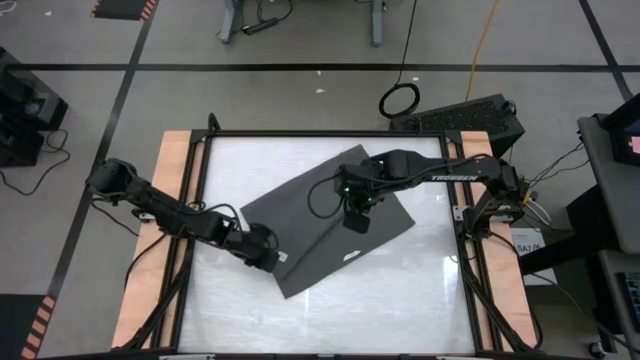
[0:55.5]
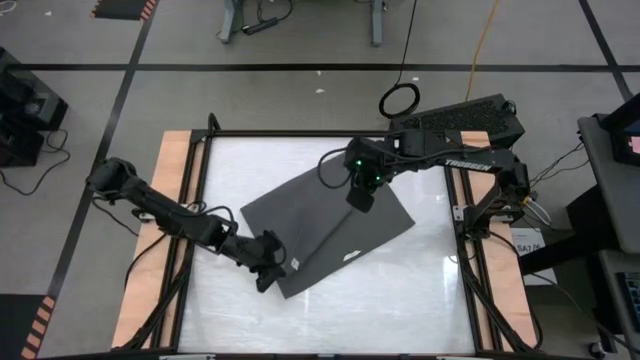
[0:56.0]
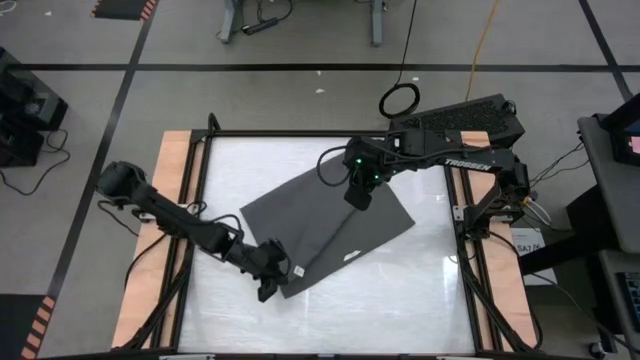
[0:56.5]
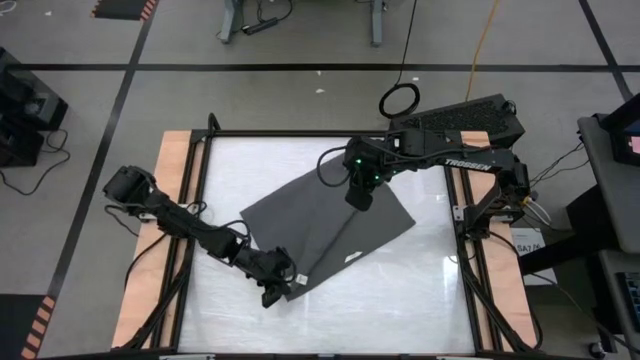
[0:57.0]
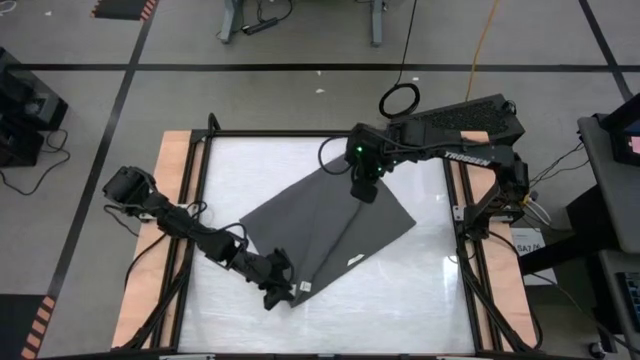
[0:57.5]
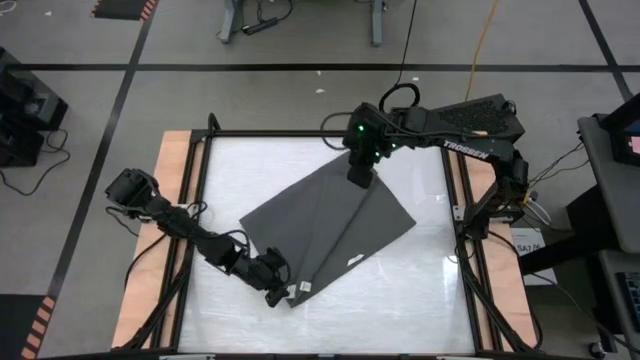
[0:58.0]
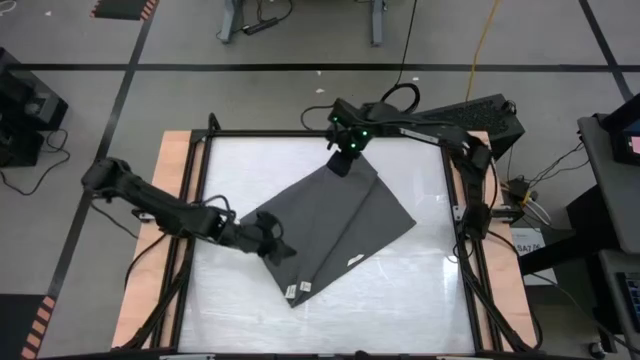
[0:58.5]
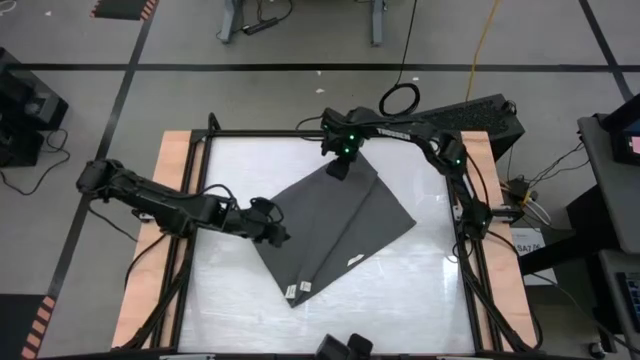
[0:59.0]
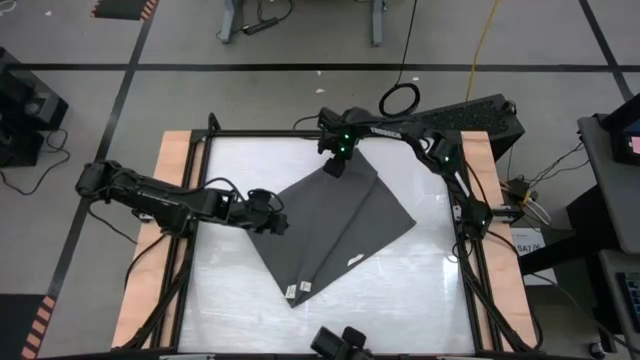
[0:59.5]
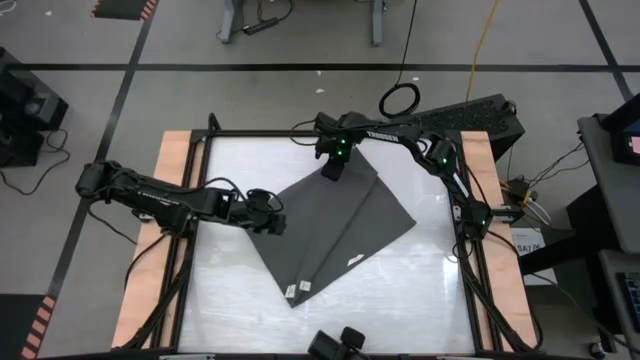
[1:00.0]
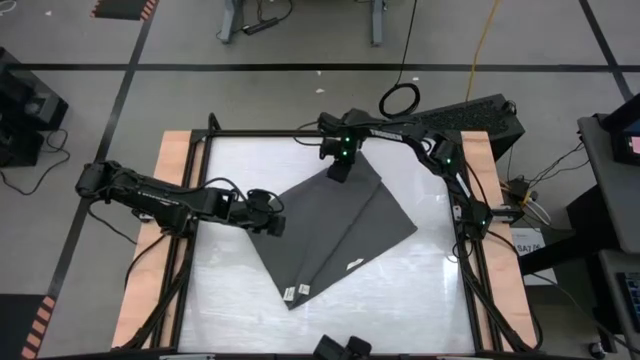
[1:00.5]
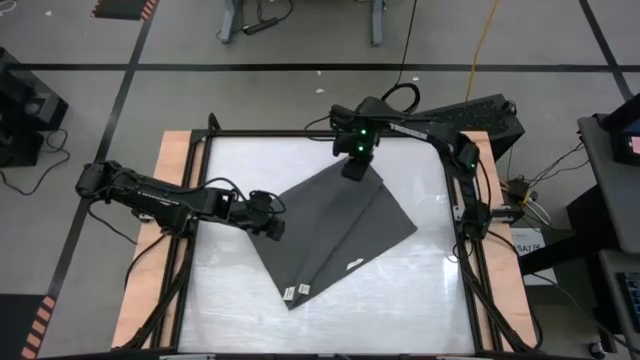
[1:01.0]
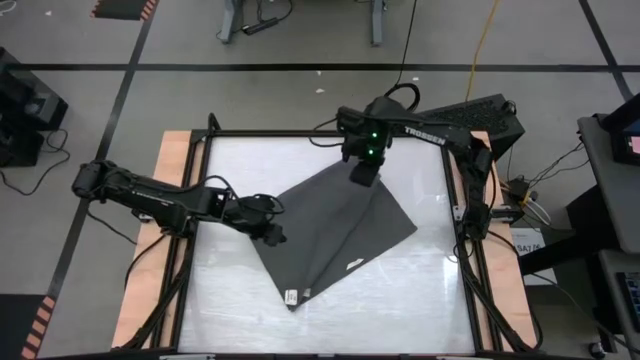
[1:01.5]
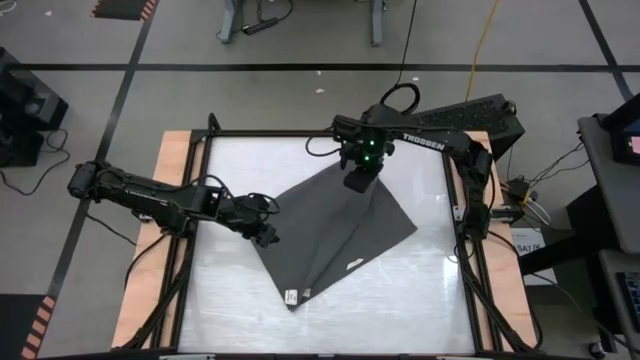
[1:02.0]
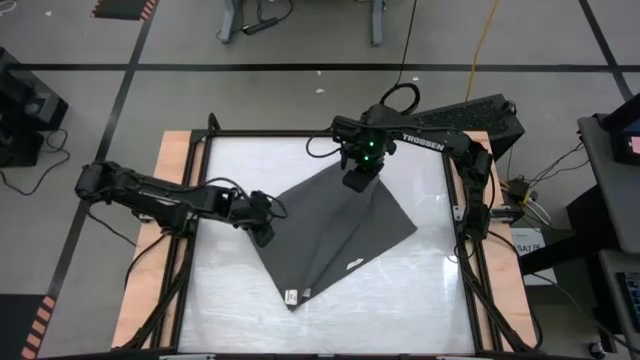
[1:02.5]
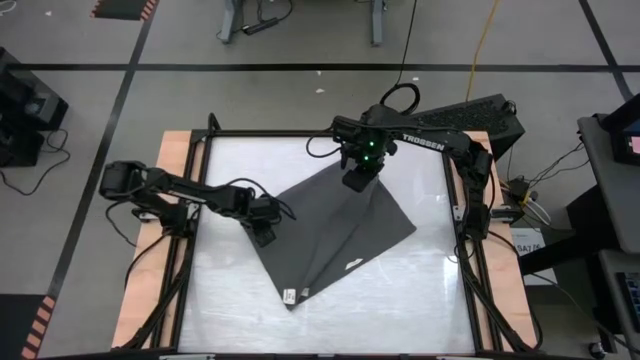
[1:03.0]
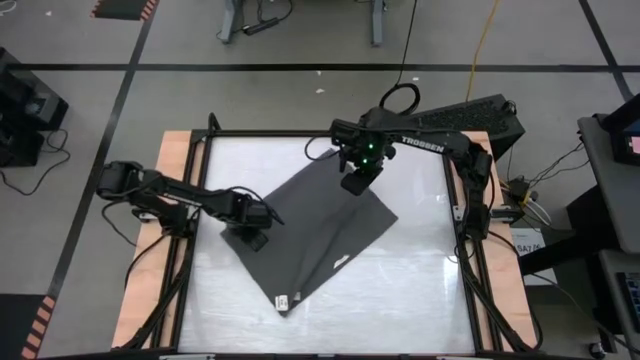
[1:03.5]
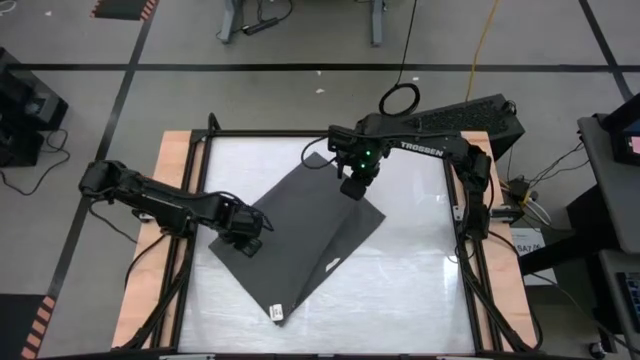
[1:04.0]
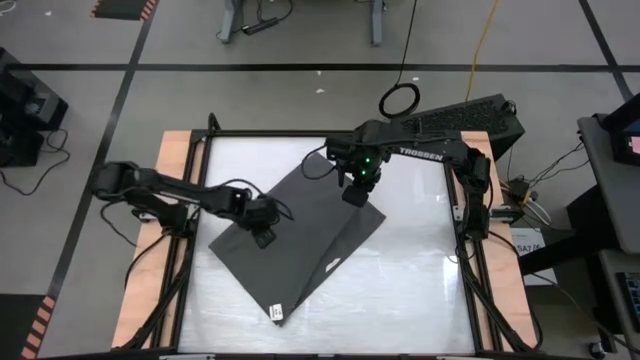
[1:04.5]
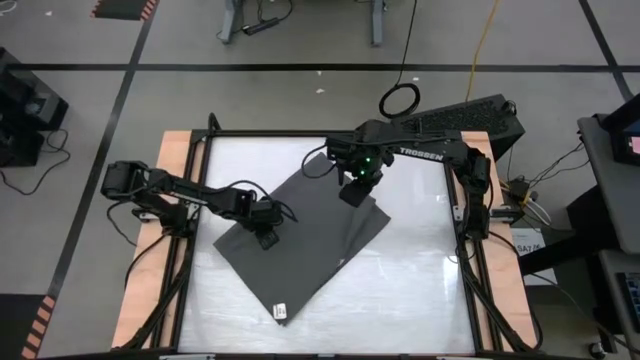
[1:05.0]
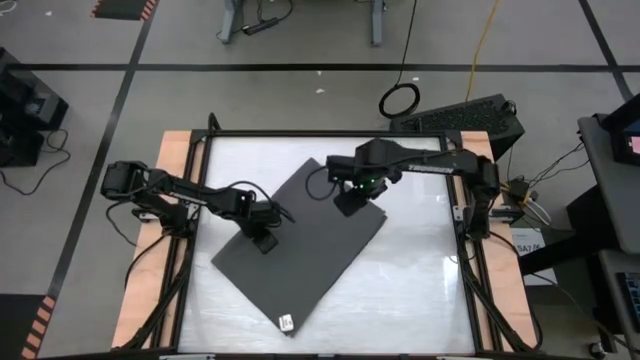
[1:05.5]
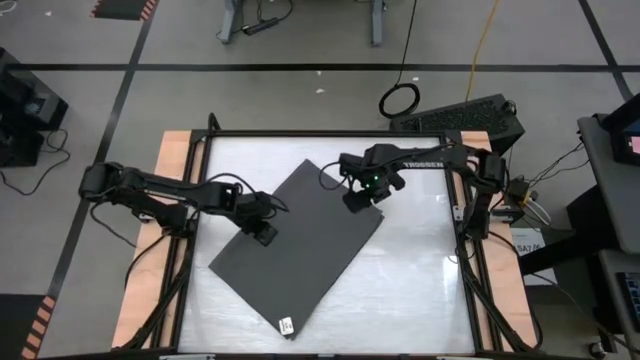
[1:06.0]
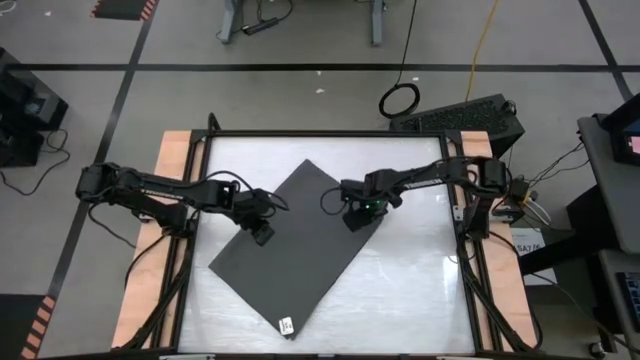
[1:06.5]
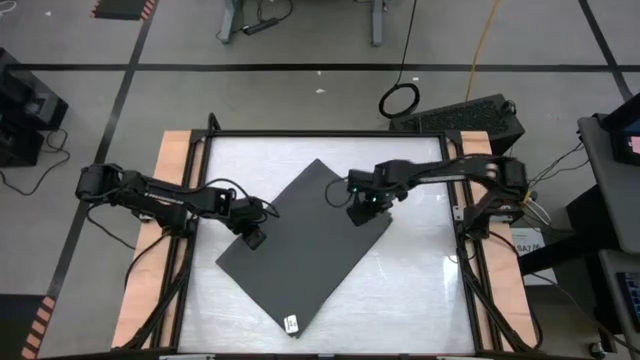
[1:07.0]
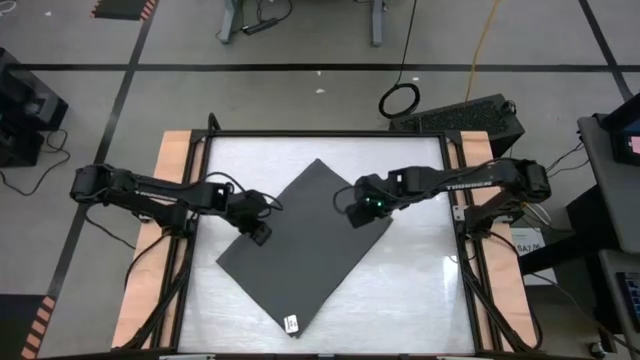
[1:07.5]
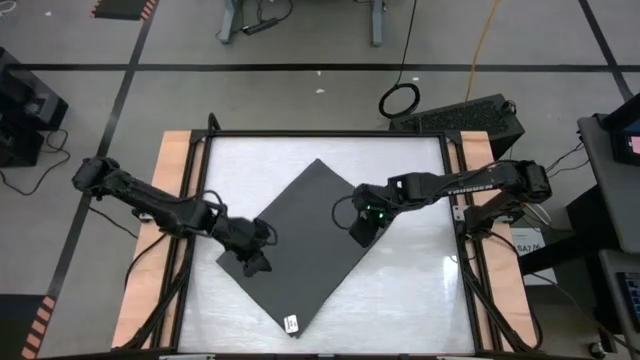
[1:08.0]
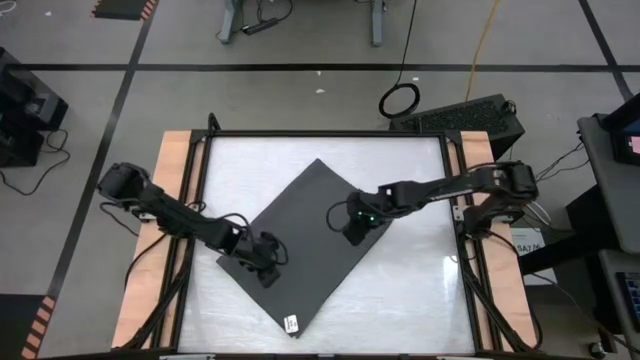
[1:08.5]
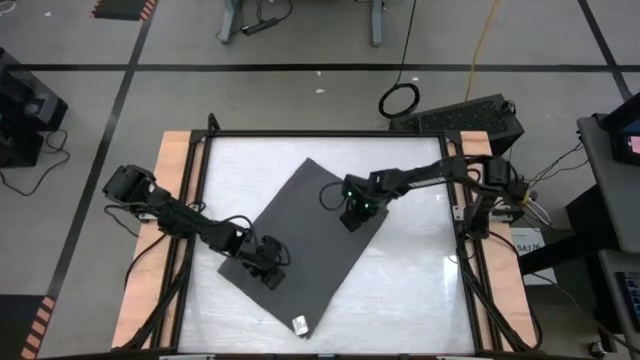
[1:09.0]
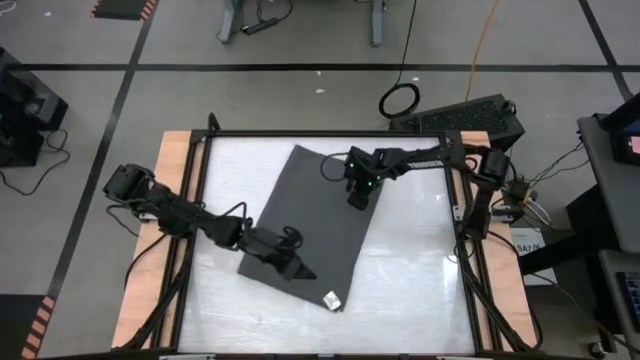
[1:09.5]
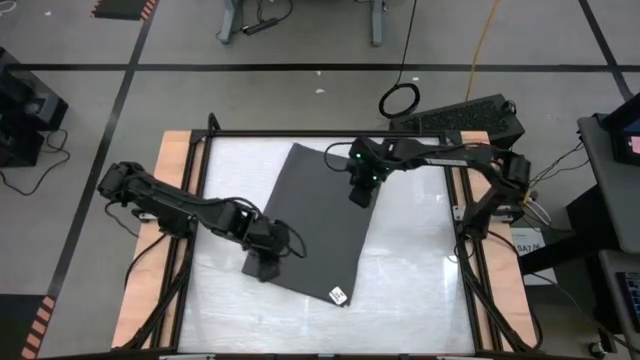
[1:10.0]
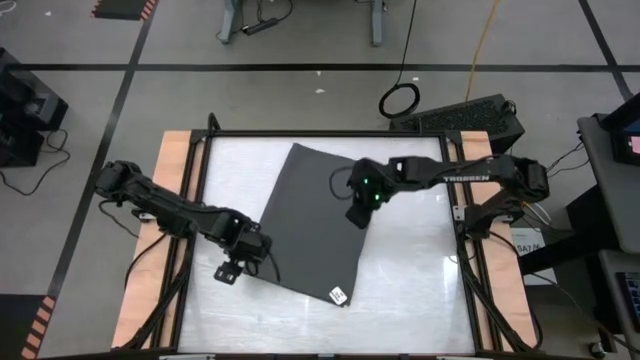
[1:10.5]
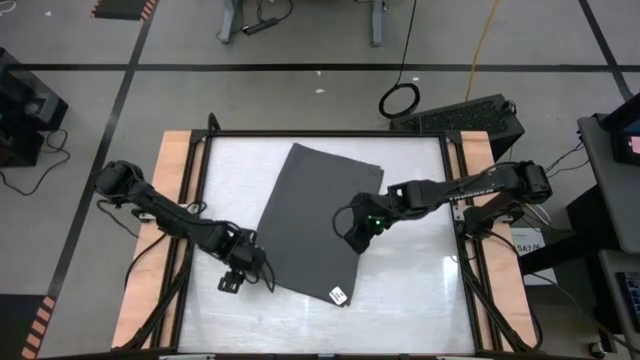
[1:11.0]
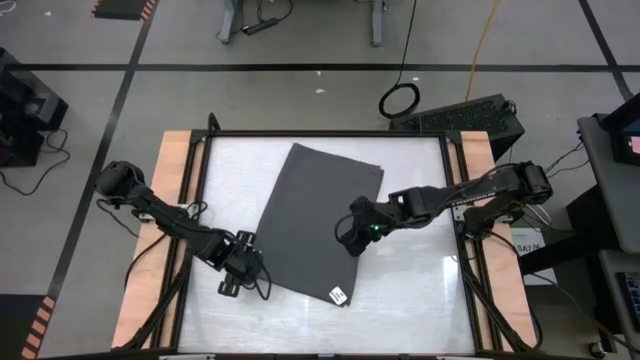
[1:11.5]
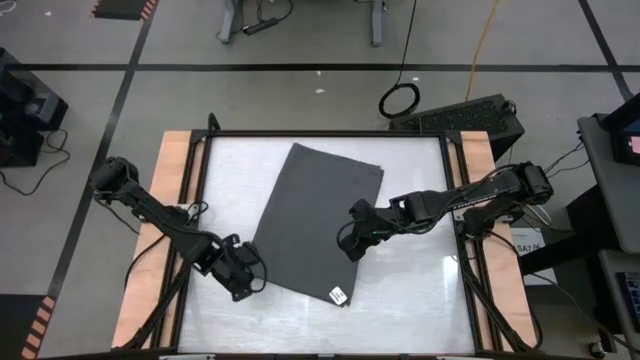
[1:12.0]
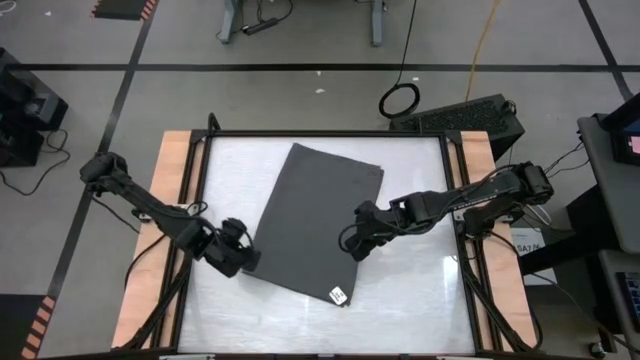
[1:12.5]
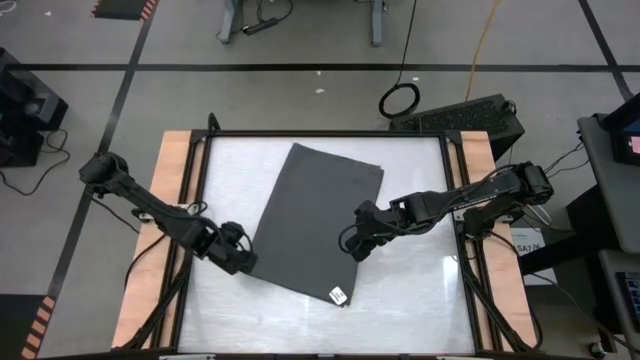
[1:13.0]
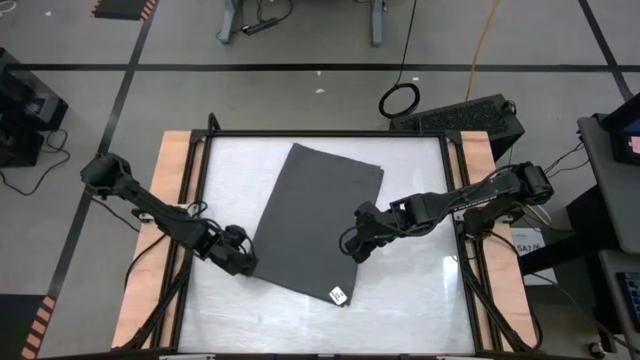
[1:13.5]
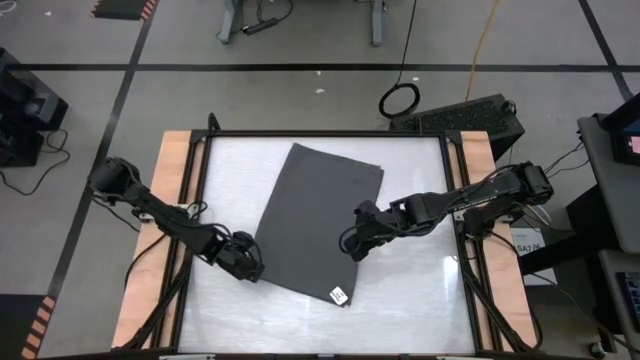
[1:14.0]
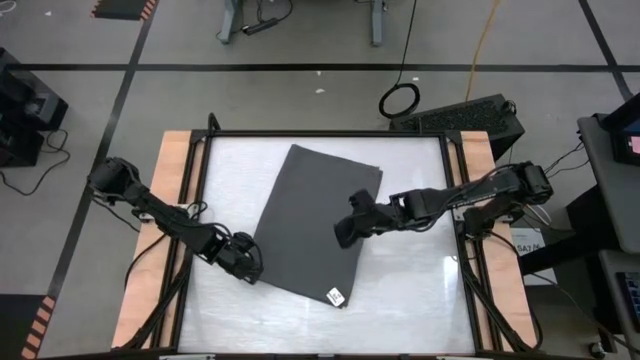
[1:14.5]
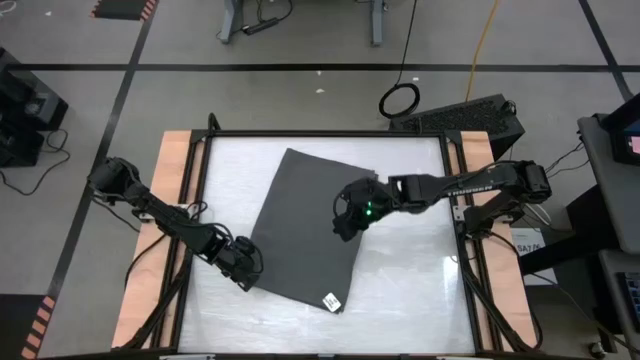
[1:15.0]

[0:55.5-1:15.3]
Task: Roll towel into tight, uniform cylinder
Roll the gray towel
